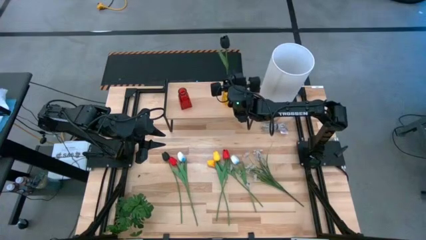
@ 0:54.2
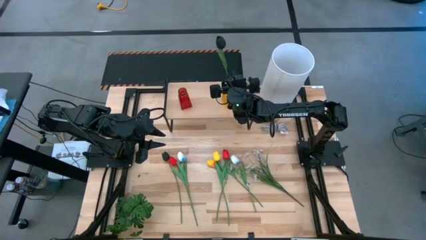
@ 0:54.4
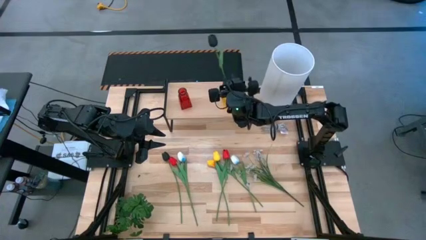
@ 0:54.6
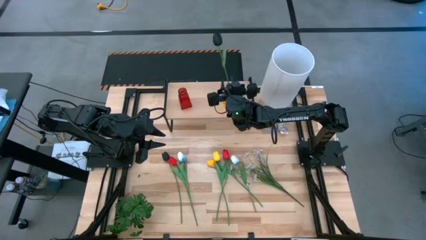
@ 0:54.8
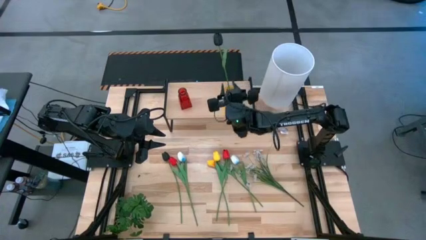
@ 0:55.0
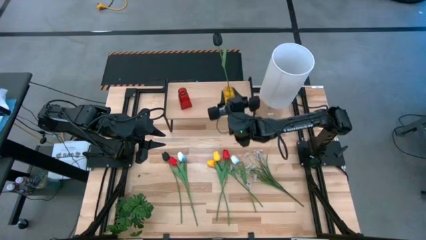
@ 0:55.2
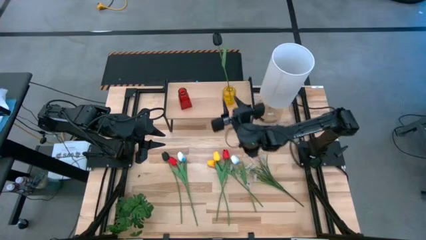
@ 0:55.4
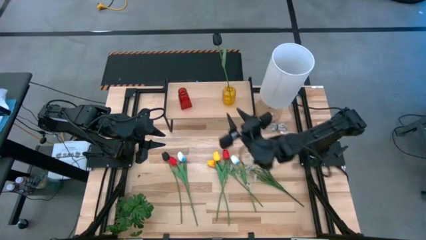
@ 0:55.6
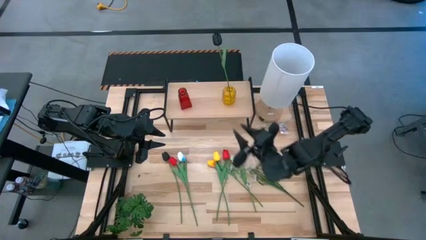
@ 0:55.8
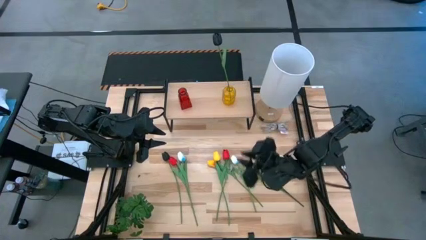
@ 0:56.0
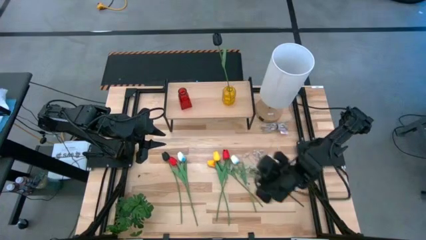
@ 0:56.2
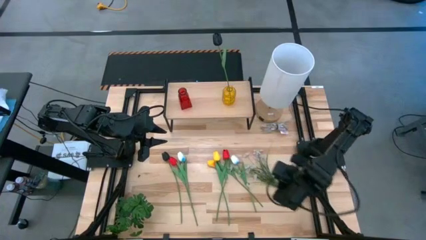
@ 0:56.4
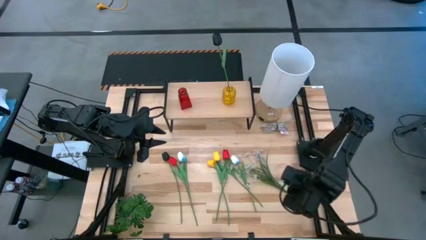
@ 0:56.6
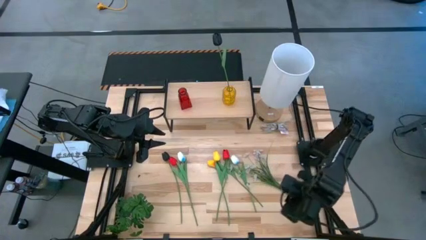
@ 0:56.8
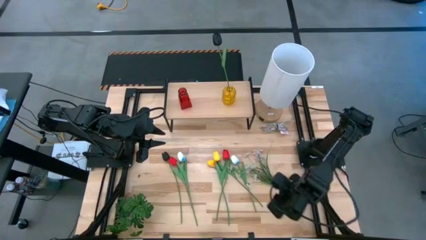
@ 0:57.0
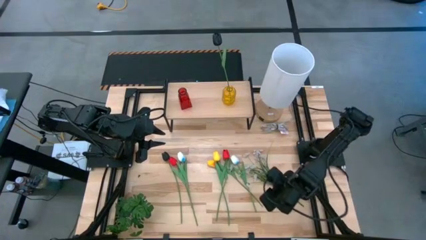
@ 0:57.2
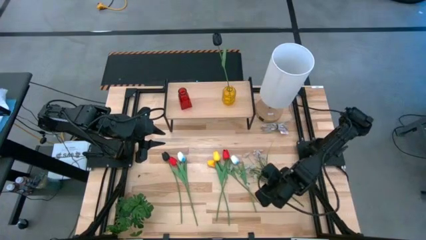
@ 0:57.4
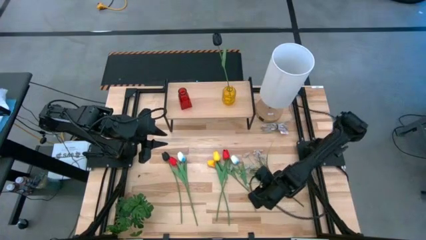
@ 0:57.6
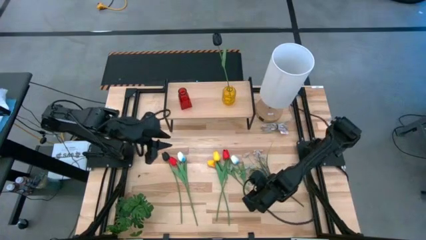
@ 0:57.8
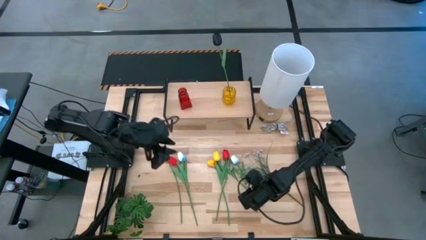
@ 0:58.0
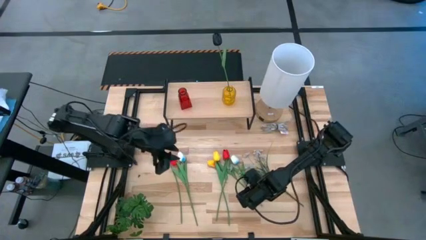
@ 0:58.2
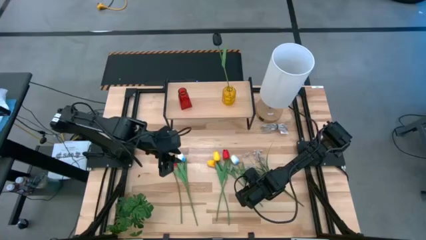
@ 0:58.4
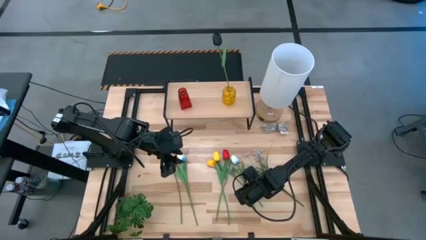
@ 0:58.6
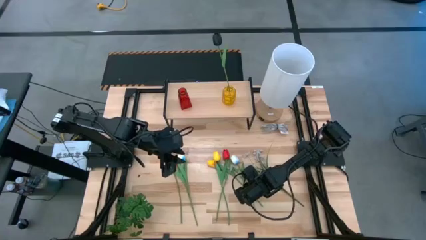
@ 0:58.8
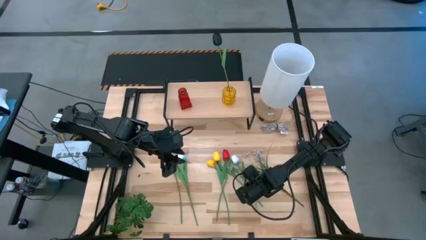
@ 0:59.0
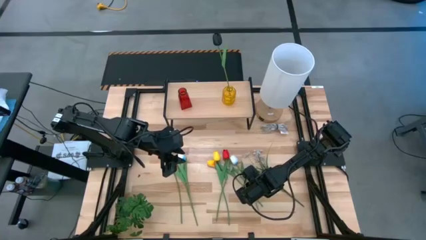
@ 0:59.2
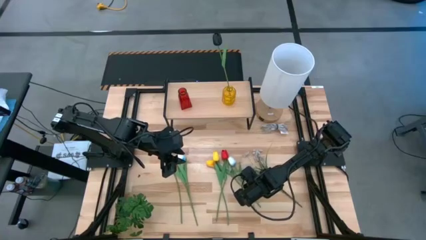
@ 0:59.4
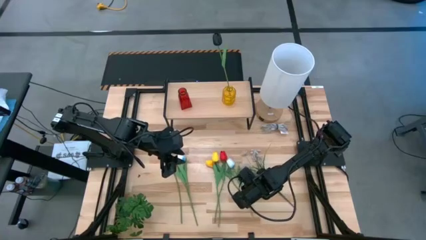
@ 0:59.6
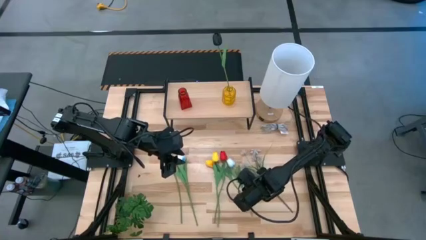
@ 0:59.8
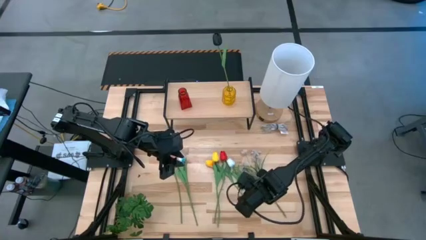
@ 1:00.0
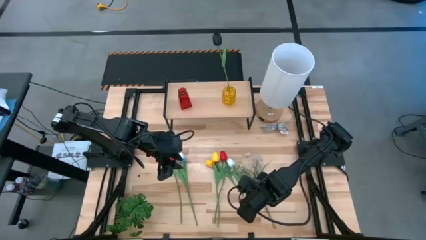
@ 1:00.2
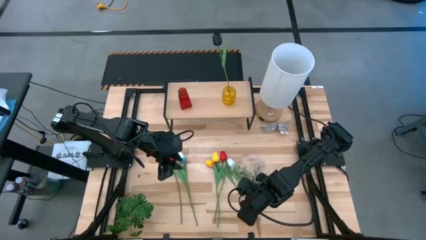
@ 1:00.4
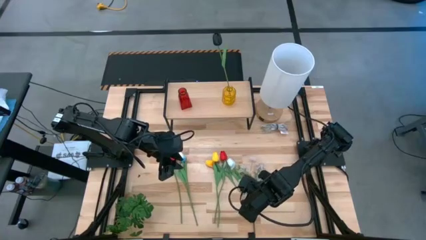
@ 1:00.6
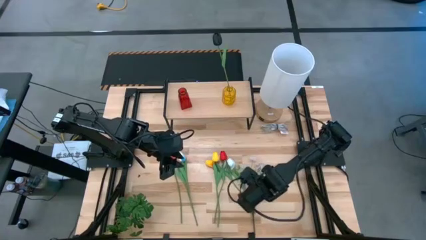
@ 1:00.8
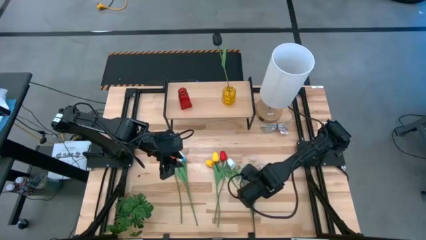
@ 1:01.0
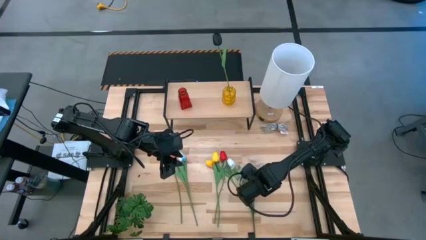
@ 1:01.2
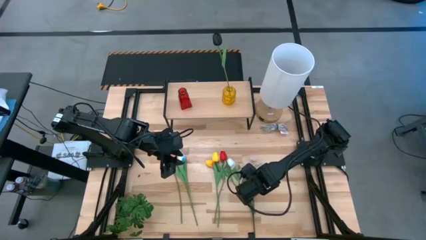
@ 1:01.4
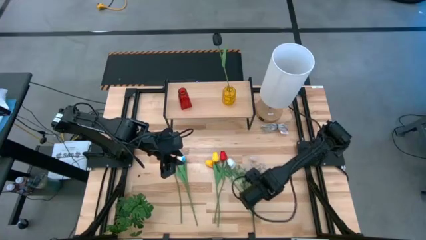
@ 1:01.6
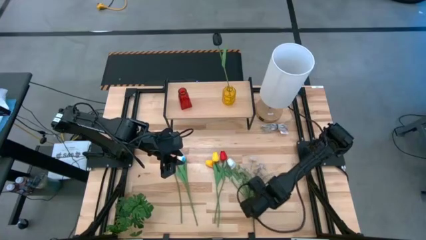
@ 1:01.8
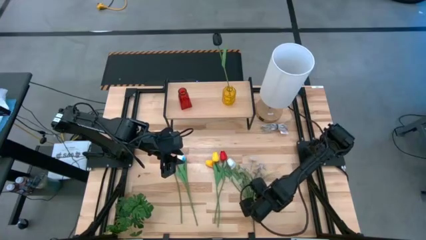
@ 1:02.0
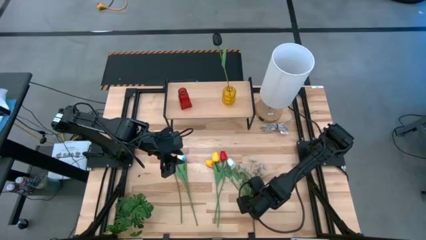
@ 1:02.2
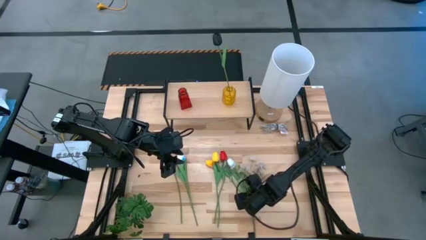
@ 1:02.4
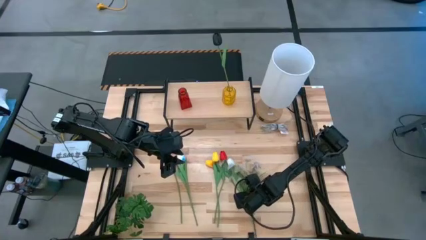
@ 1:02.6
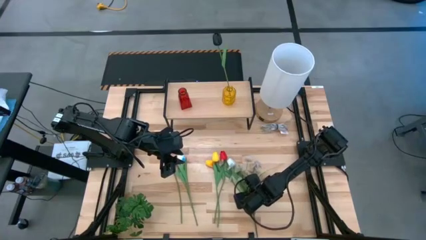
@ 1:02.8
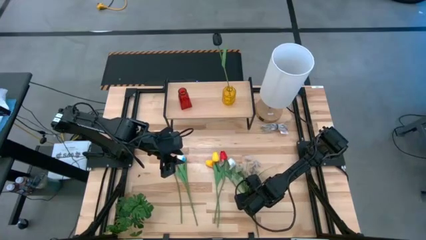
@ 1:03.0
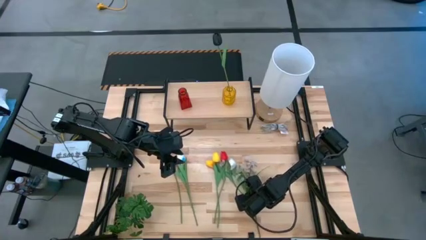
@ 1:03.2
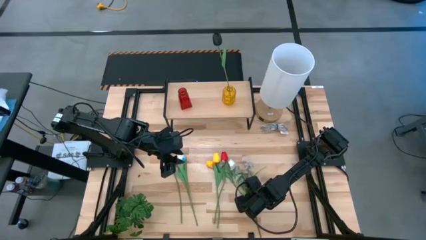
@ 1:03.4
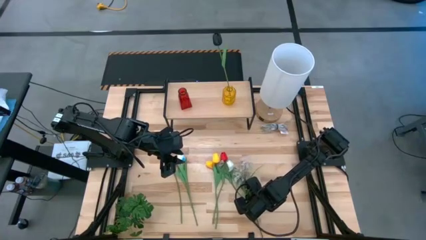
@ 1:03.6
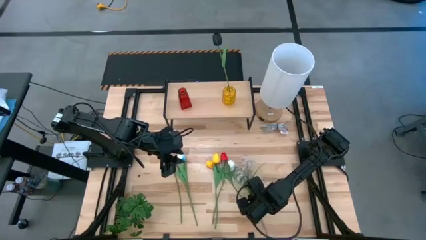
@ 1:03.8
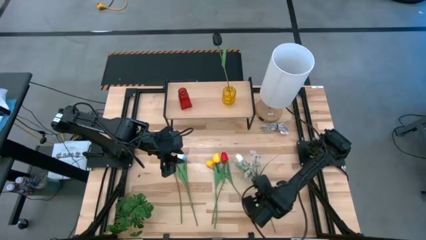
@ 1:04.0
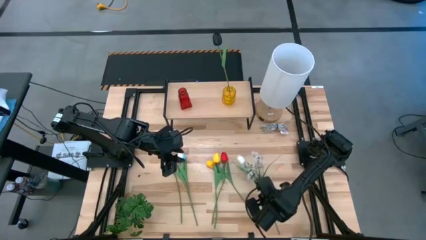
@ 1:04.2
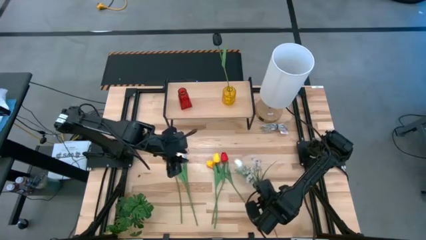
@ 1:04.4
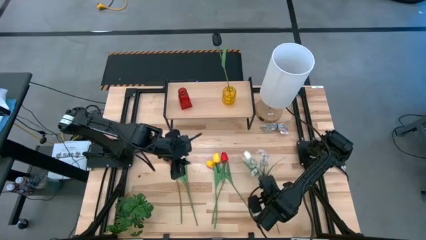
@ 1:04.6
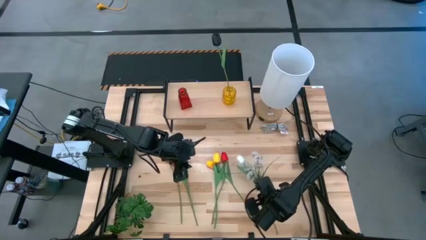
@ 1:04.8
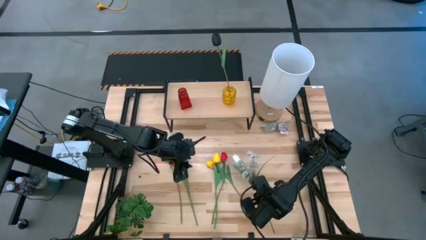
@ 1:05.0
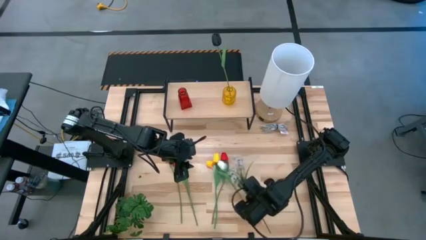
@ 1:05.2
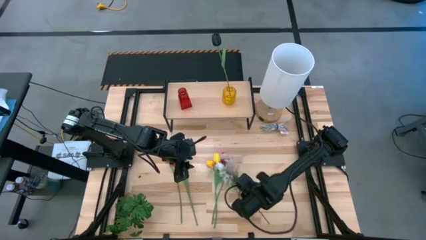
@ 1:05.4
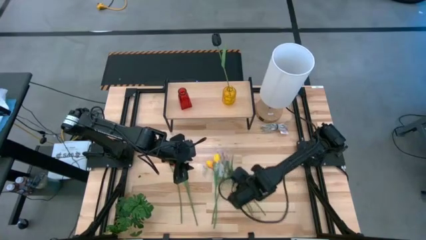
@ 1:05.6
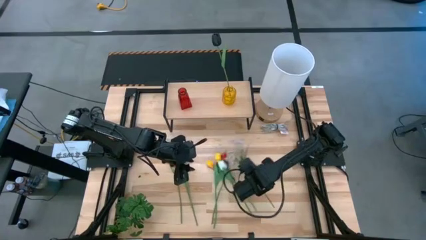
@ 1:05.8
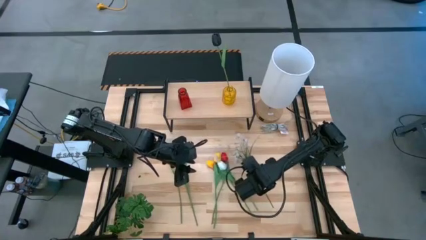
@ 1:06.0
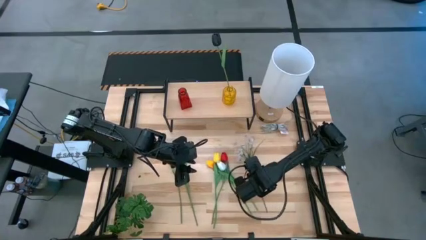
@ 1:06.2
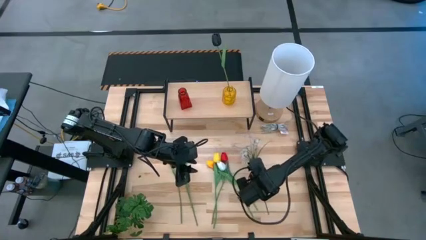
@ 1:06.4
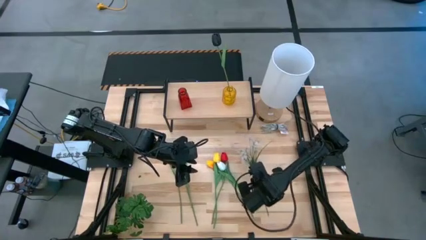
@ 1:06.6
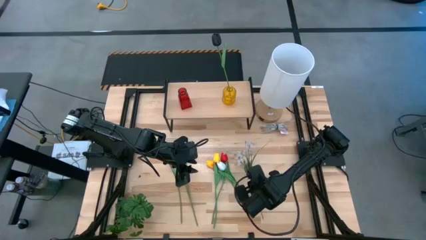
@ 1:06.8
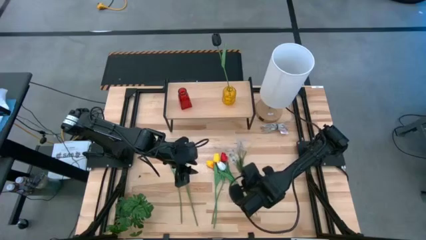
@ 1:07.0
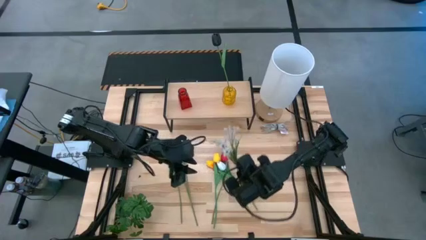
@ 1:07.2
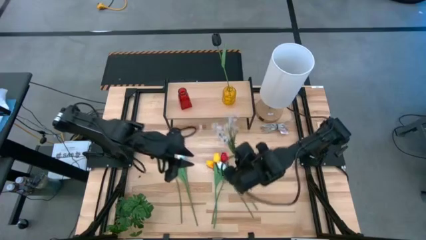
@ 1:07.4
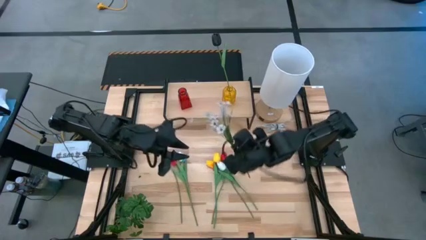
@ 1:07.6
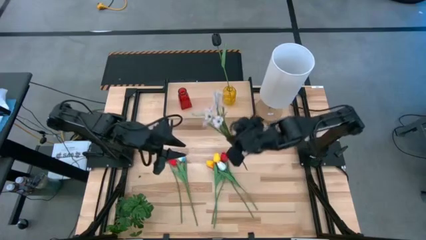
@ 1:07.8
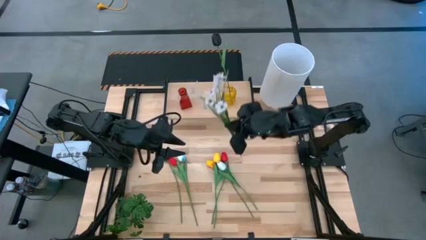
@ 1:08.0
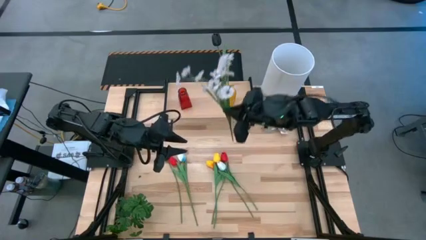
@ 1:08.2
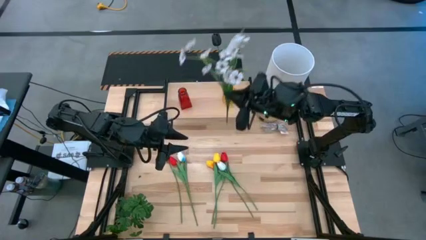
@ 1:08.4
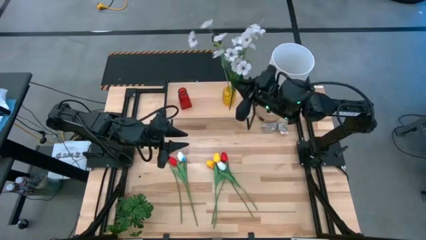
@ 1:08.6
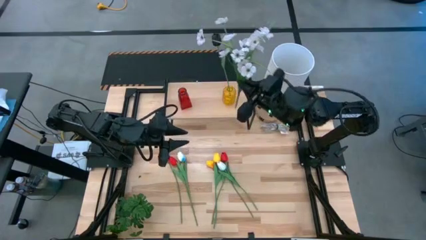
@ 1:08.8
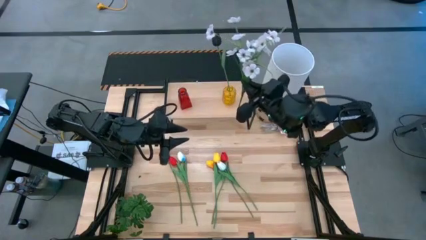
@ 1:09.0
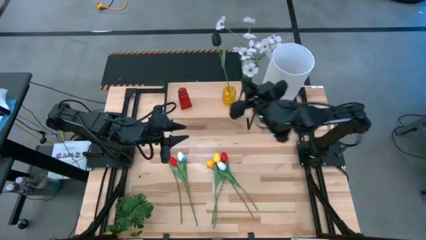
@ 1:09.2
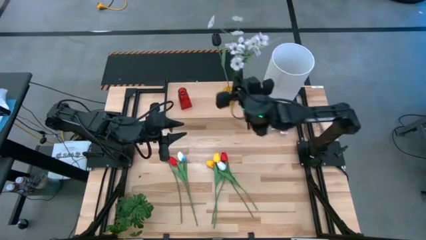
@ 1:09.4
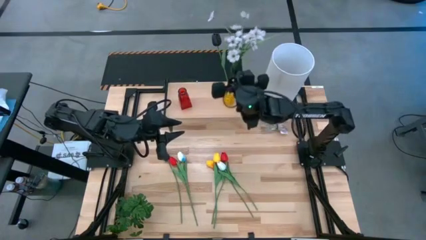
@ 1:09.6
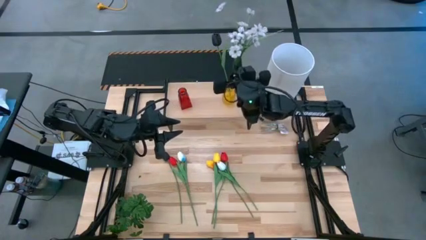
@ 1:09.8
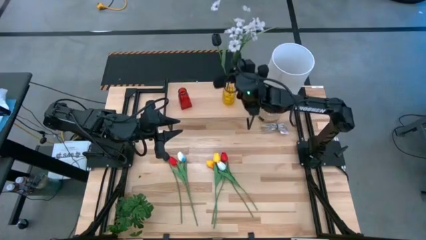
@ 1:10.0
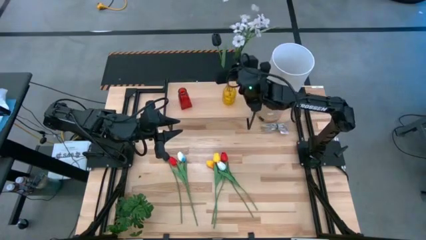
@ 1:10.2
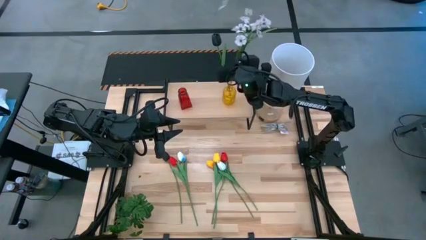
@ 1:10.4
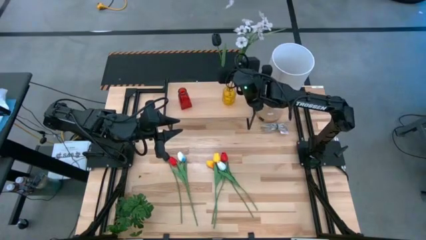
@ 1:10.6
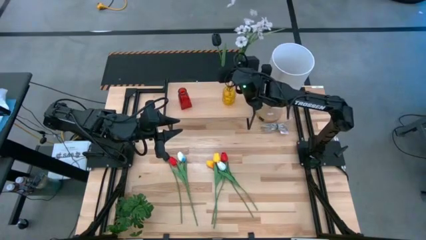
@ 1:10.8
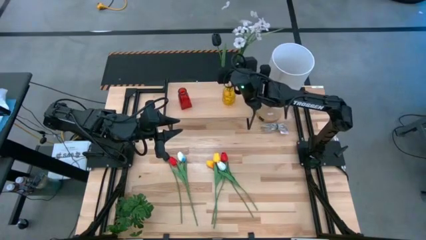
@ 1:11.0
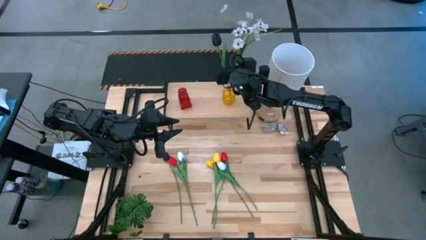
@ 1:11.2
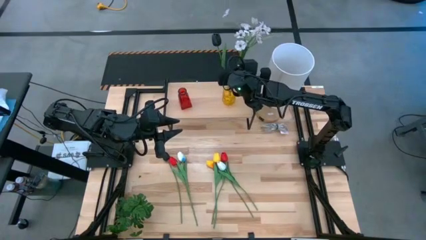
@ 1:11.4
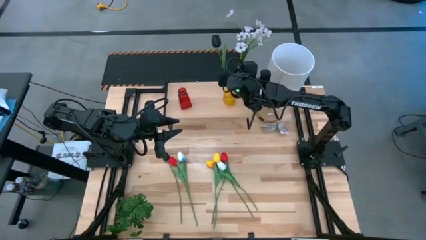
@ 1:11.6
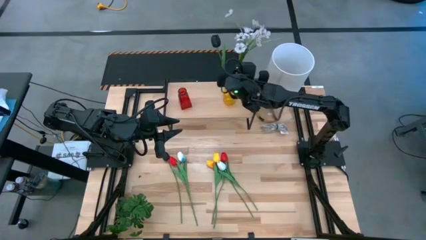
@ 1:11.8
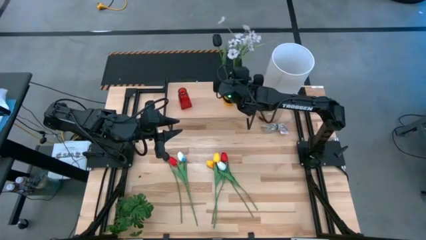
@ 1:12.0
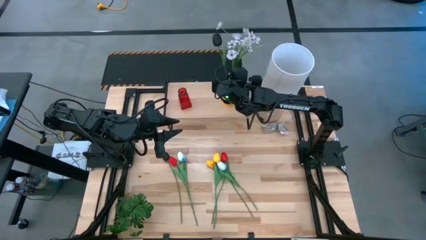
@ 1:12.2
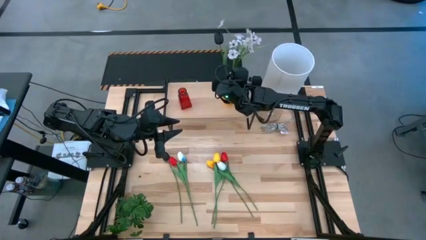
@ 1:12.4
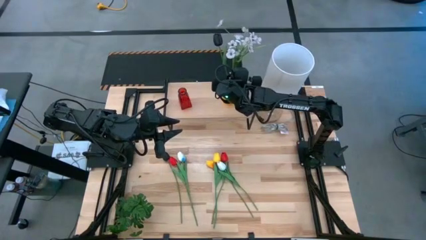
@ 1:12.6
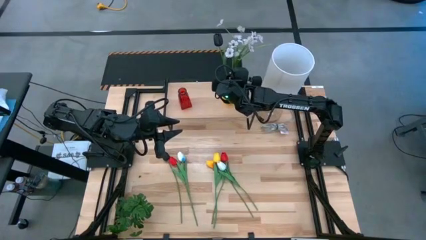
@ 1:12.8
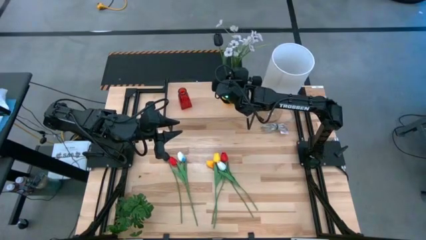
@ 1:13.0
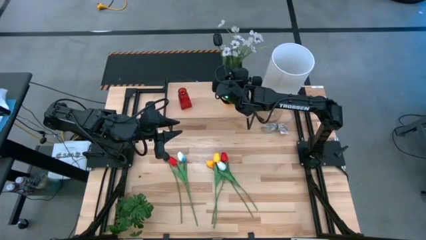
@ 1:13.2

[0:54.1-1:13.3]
Task: Pick and place flowers into a vace then onto a shelf
Put the white flower into the yellow flower vase
